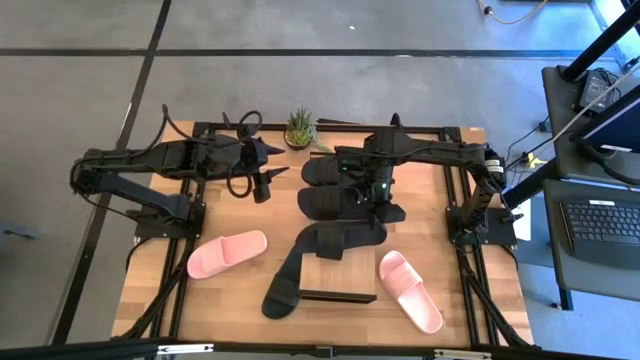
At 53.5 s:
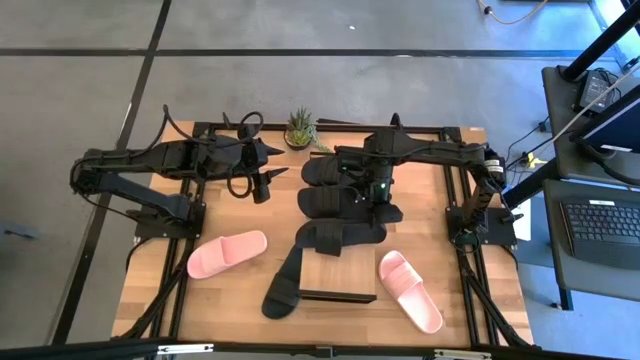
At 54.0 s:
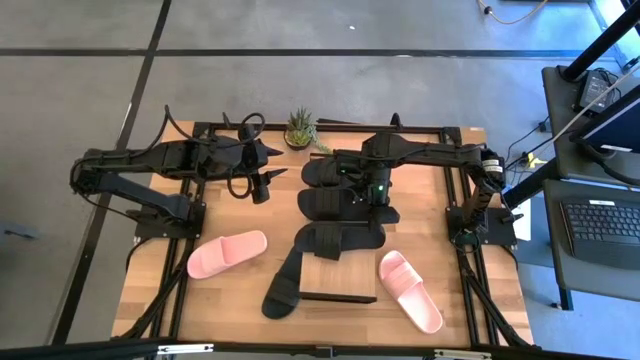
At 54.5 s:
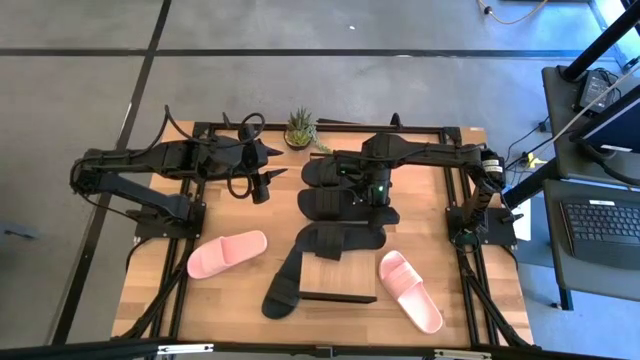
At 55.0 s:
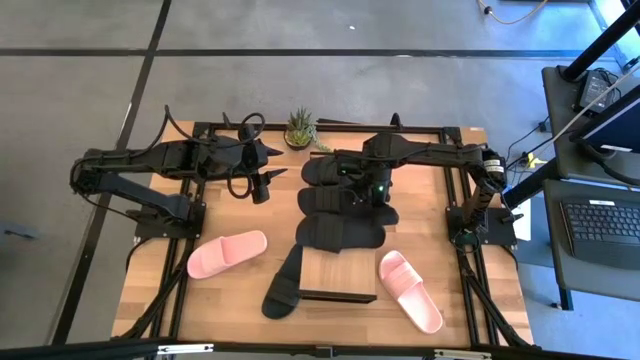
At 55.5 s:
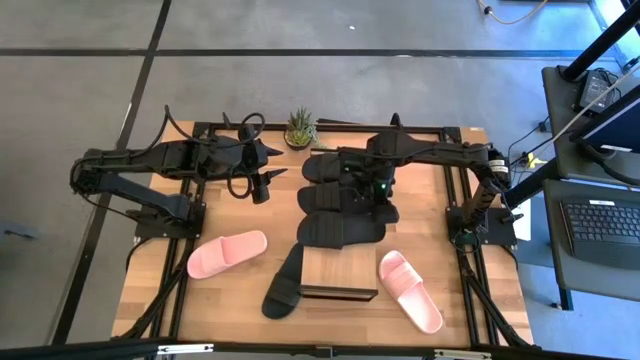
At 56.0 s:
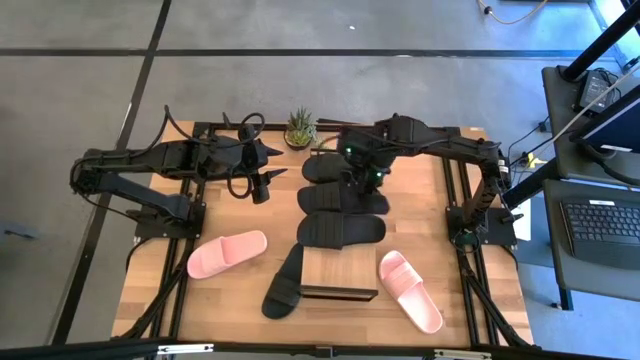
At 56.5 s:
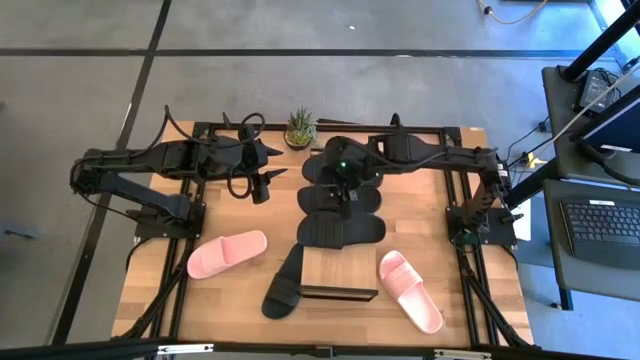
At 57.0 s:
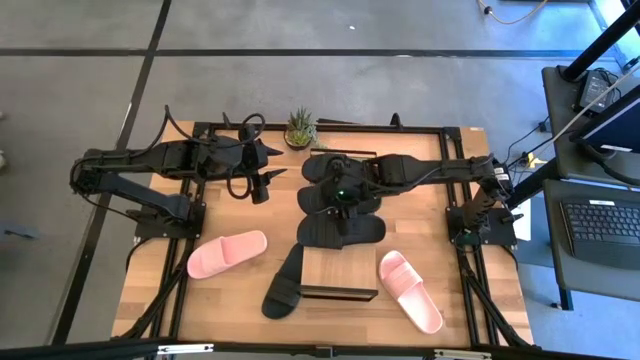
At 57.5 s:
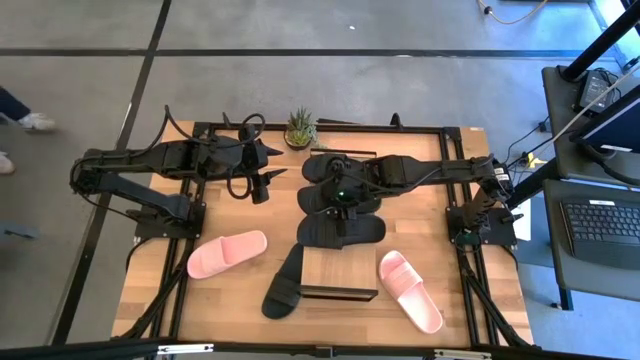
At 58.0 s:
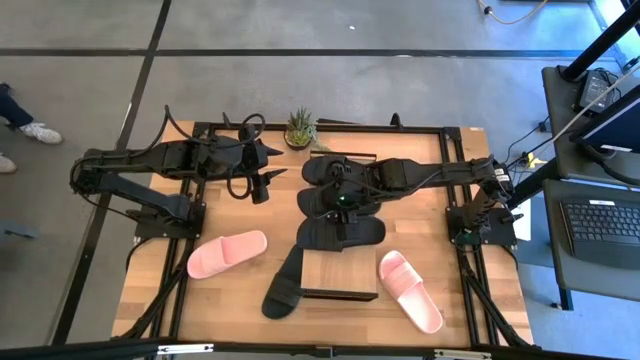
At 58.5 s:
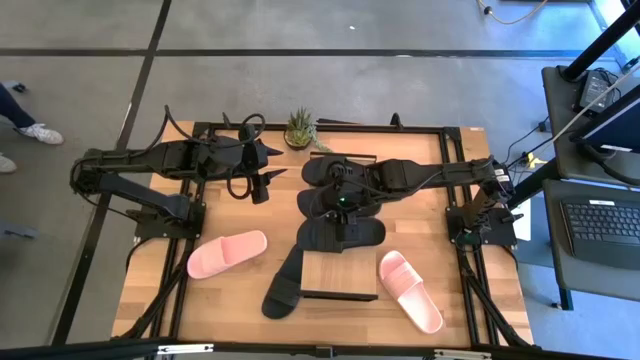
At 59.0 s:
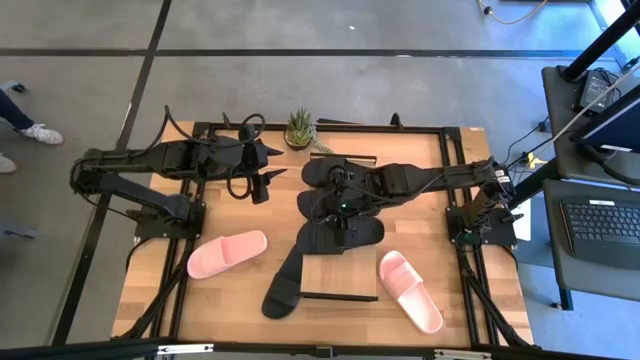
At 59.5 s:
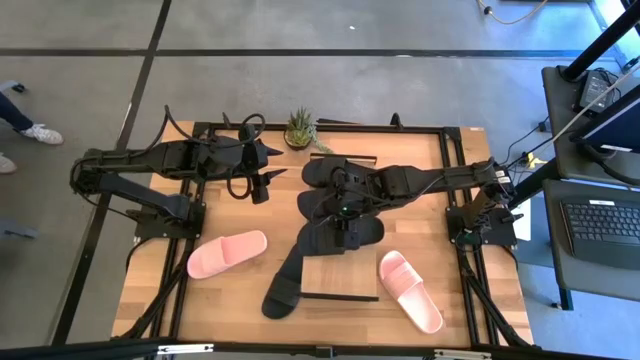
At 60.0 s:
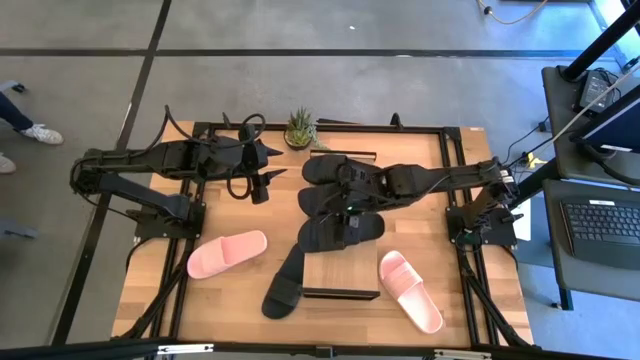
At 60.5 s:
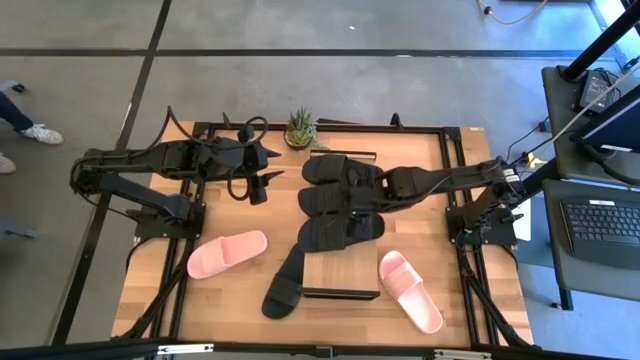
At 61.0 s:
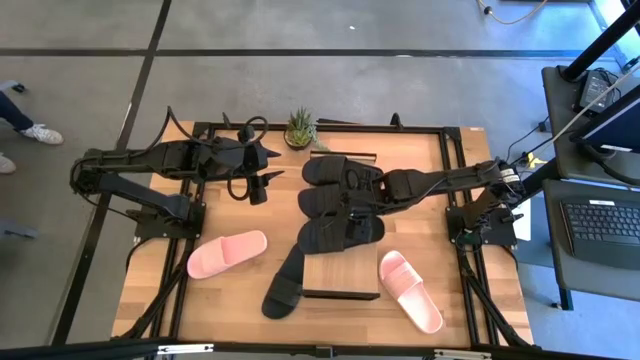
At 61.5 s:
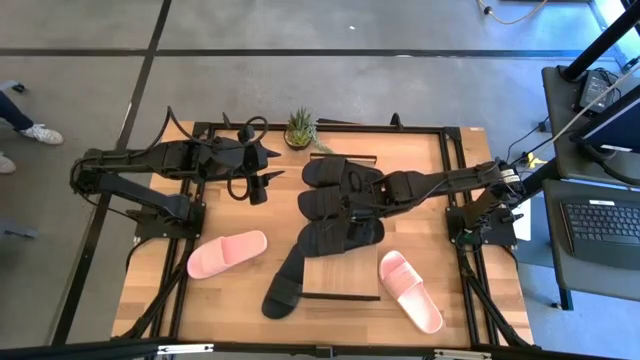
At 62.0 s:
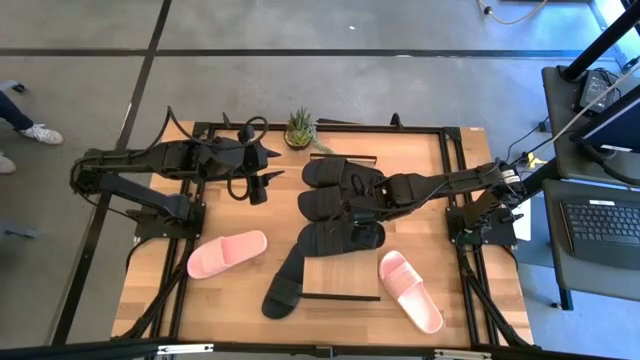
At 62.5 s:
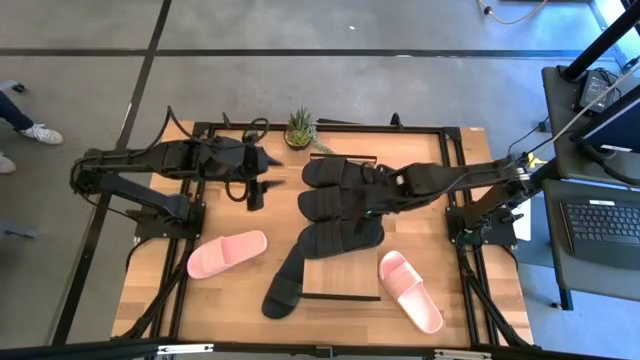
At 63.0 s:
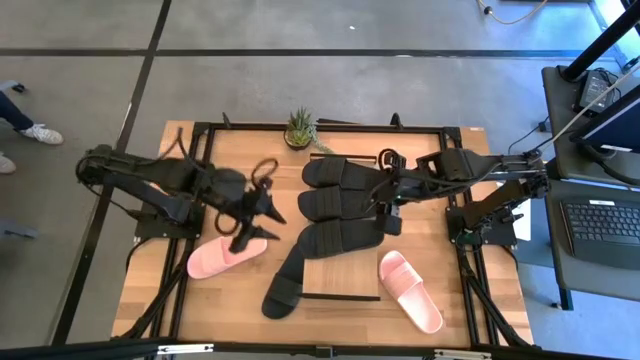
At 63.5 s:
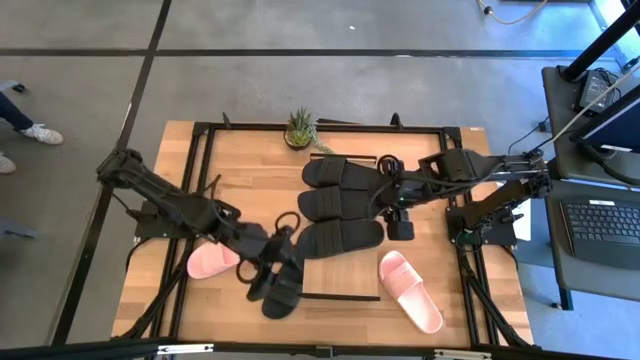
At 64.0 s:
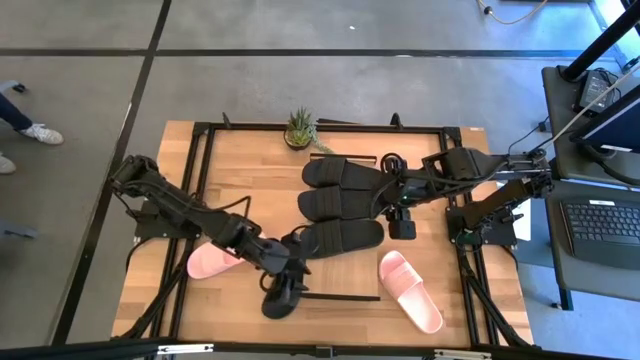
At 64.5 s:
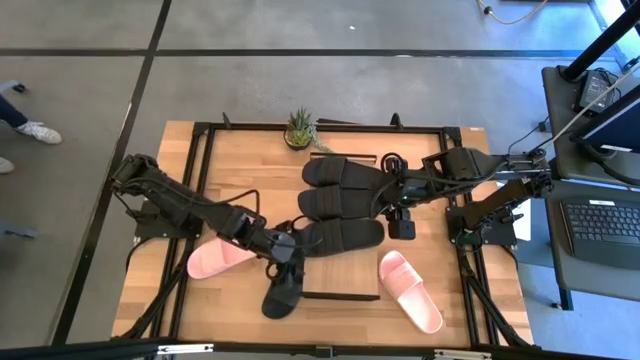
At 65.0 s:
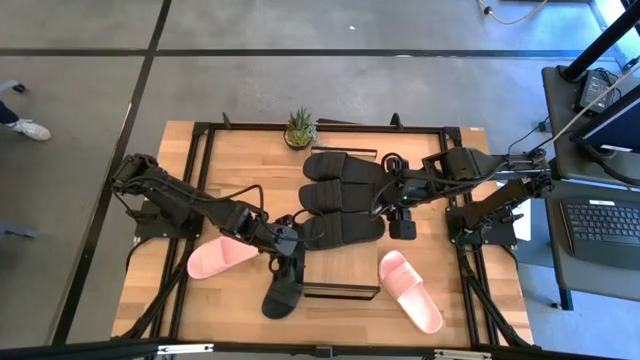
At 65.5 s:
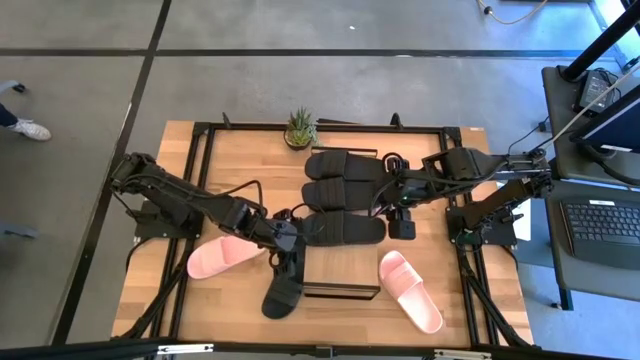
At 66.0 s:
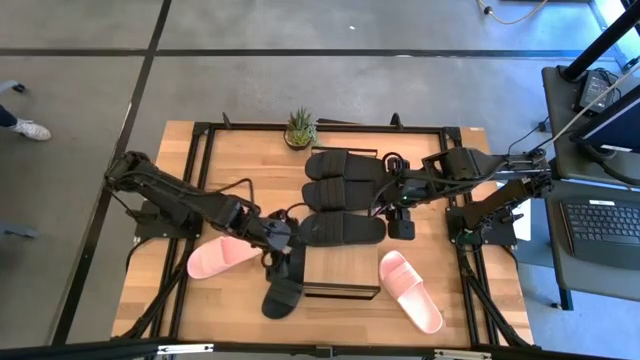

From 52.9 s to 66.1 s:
Task: Pick and place slides into the shelf
Put the black slipper on the shelf

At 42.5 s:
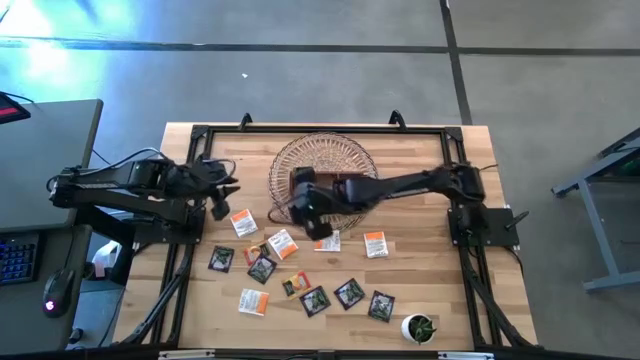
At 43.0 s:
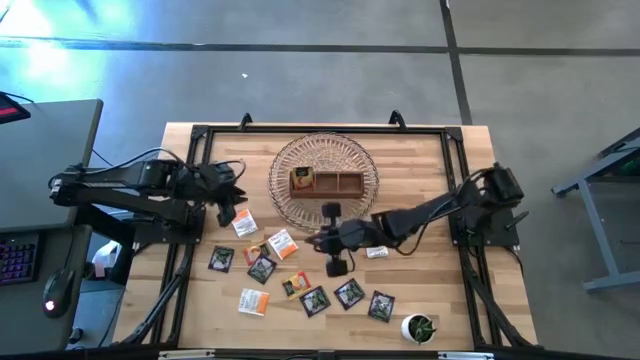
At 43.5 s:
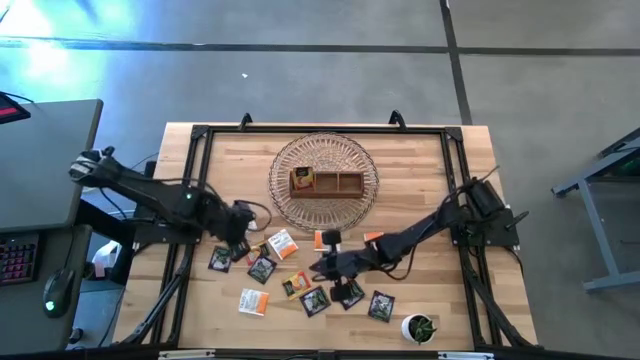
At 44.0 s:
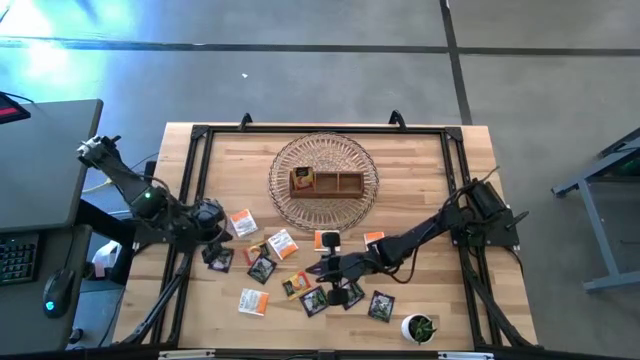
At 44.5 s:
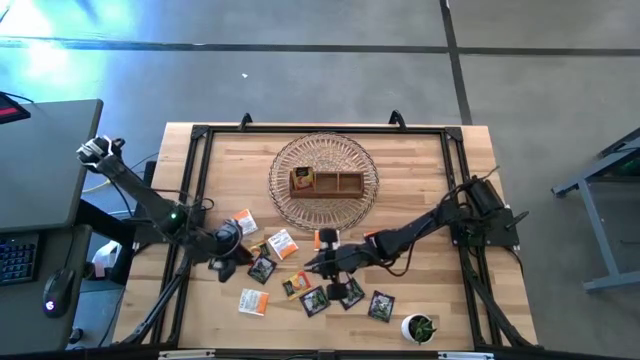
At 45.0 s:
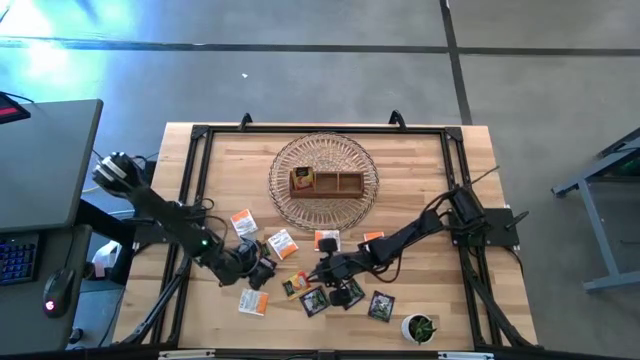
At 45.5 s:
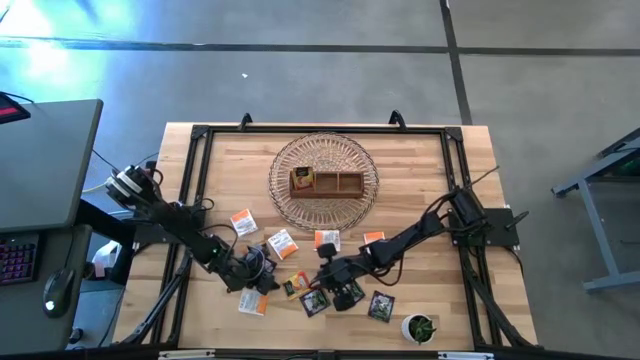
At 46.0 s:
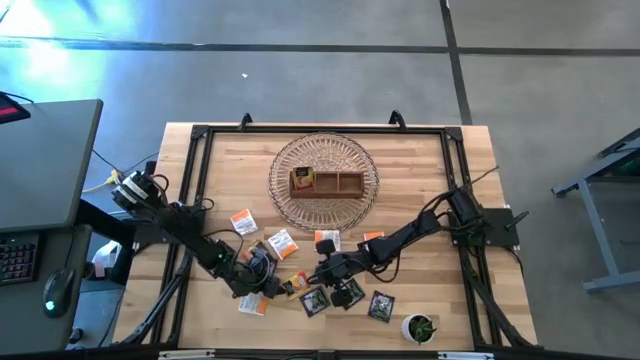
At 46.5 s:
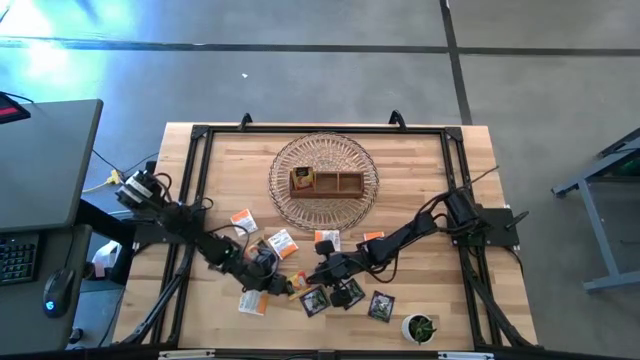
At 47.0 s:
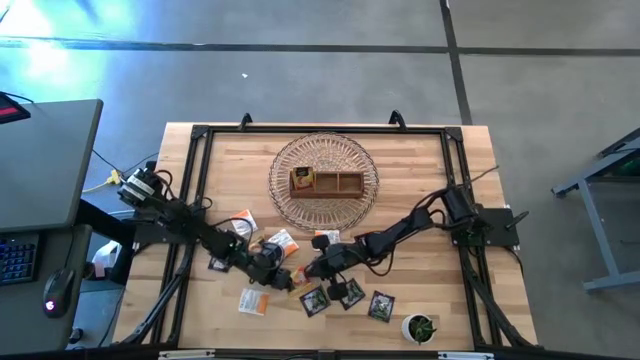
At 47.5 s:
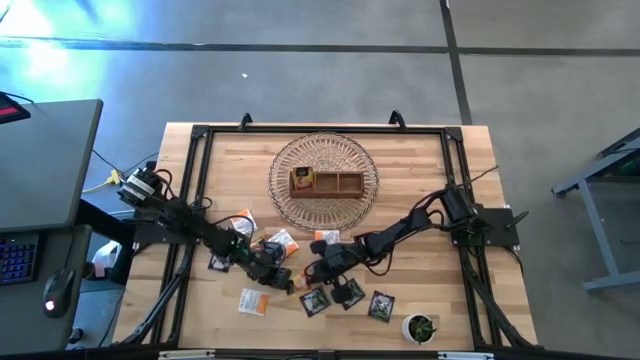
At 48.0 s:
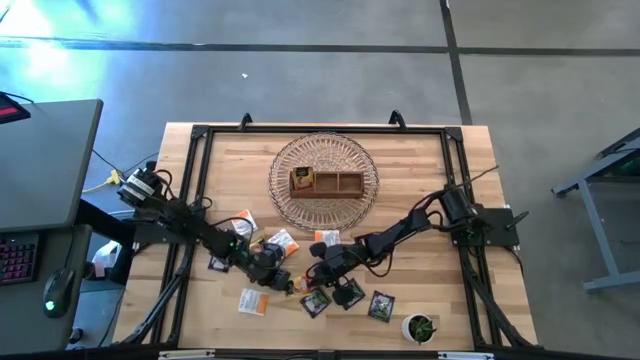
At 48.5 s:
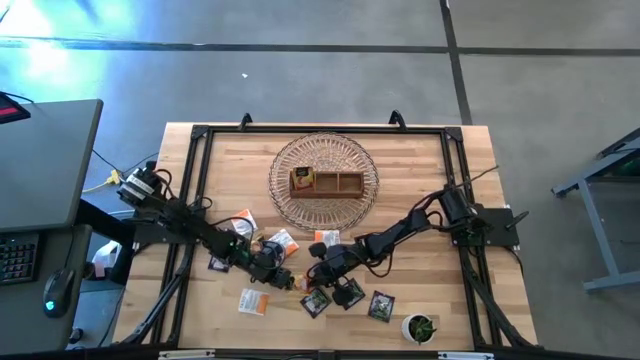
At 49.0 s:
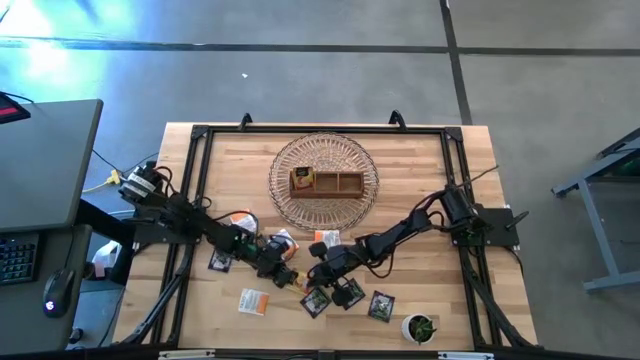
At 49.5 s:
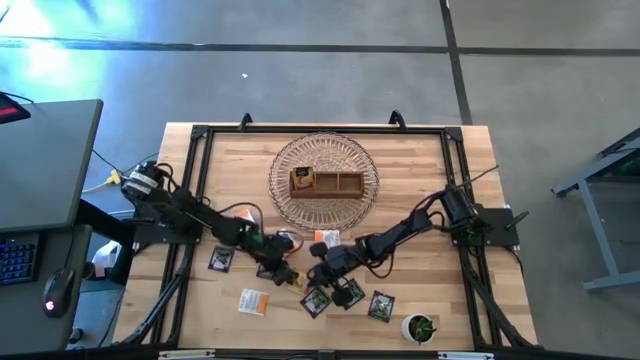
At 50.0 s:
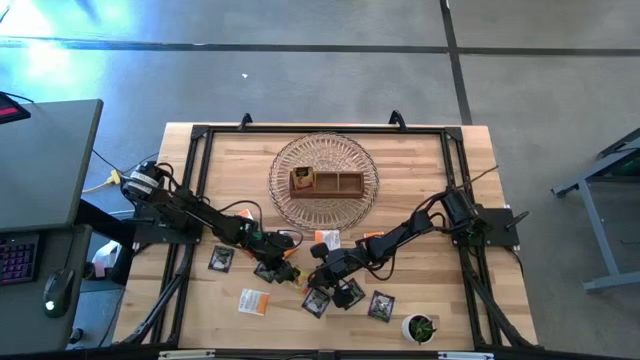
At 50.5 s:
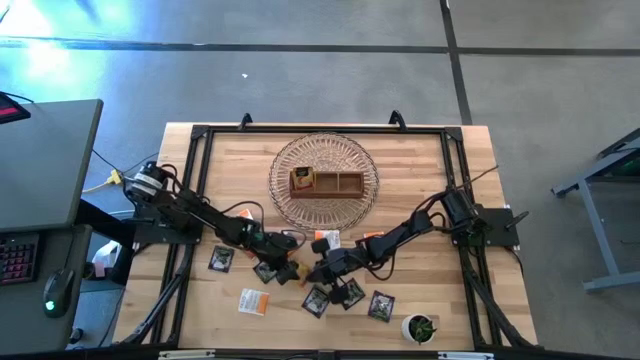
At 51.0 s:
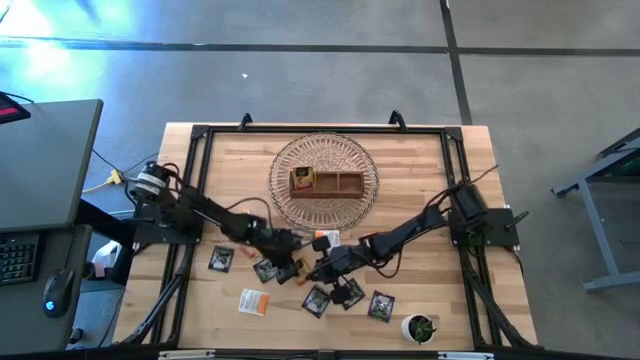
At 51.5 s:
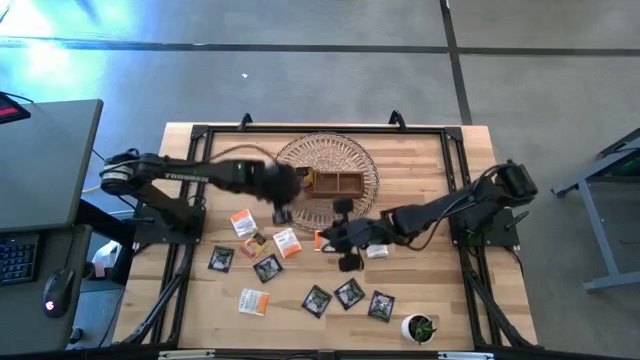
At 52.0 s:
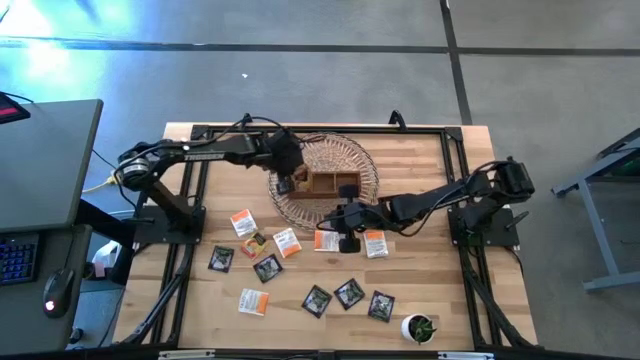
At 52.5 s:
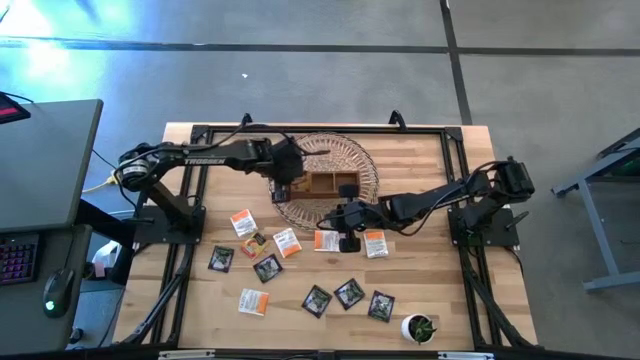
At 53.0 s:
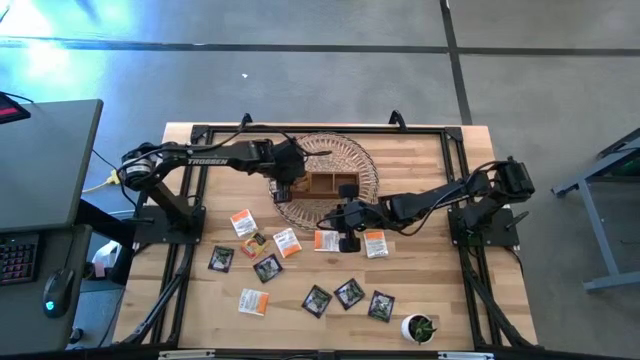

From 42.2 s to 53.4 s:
Task: Pick & Place Tea
Put the yellow tea bag into the left section of the wooden organizer
